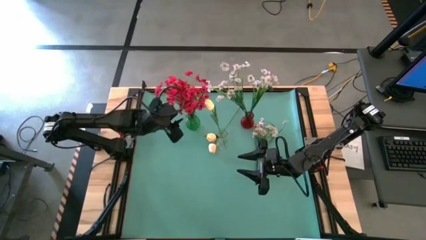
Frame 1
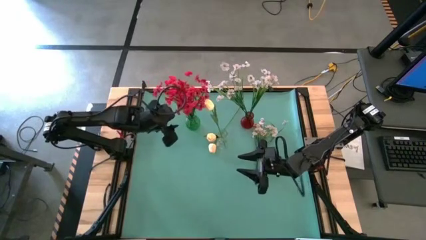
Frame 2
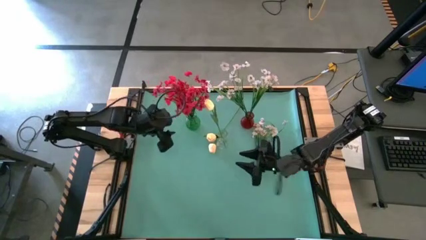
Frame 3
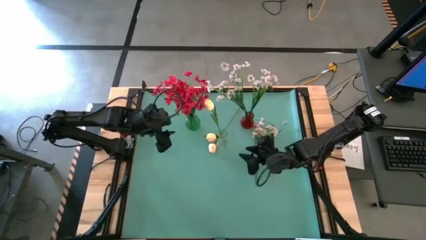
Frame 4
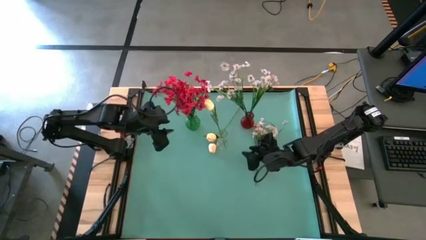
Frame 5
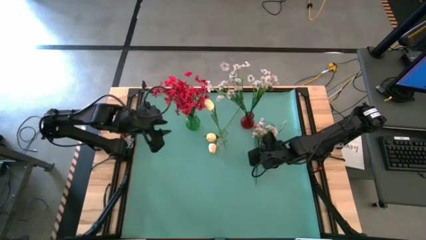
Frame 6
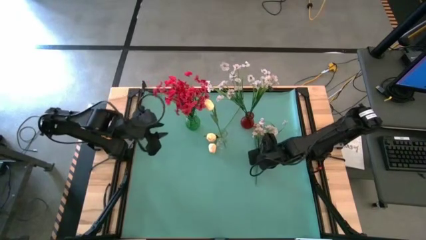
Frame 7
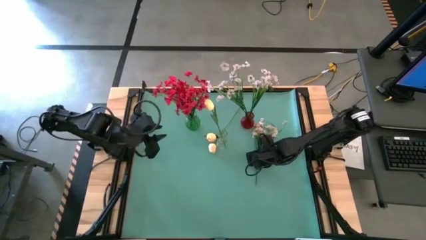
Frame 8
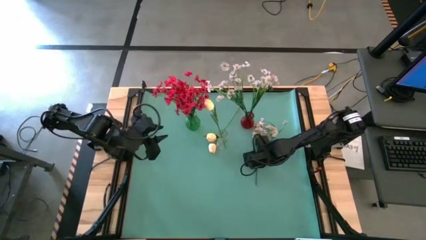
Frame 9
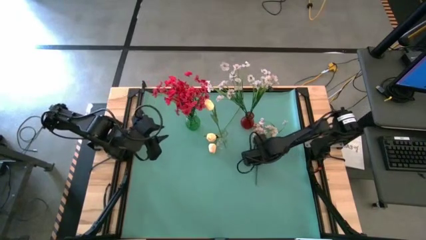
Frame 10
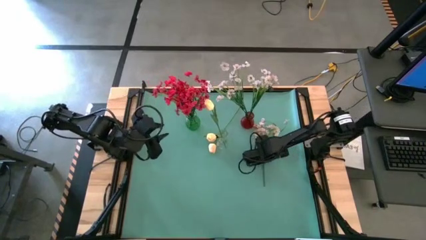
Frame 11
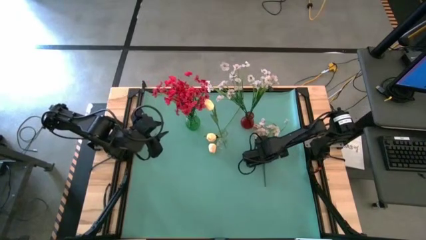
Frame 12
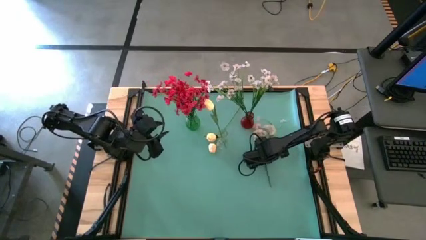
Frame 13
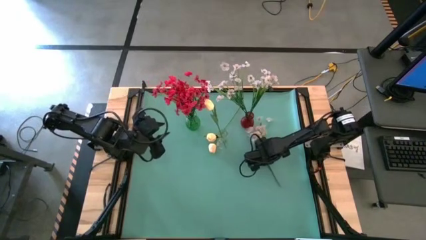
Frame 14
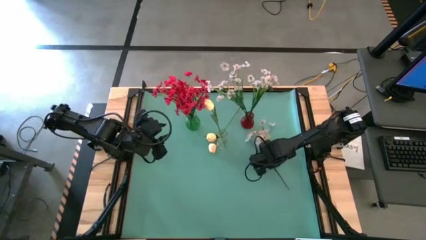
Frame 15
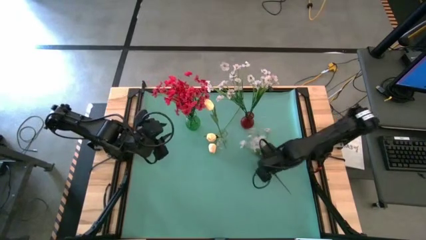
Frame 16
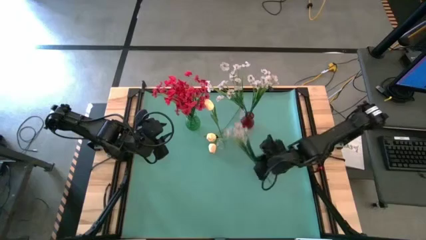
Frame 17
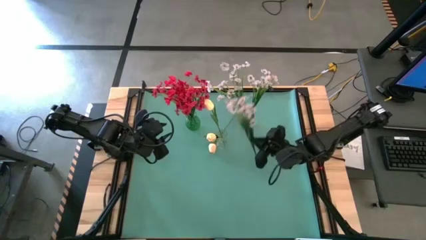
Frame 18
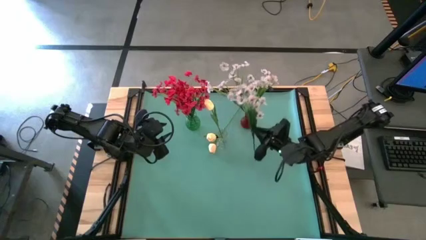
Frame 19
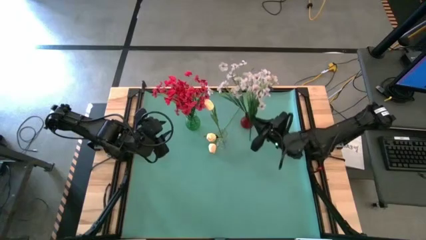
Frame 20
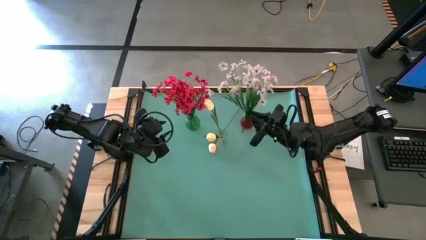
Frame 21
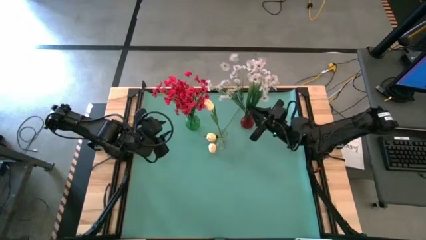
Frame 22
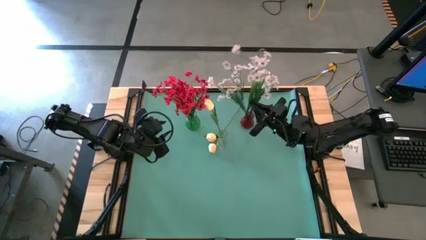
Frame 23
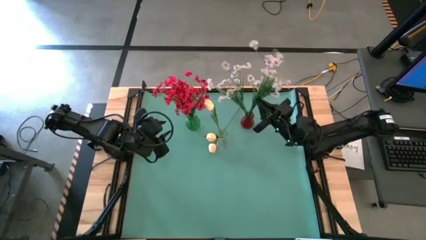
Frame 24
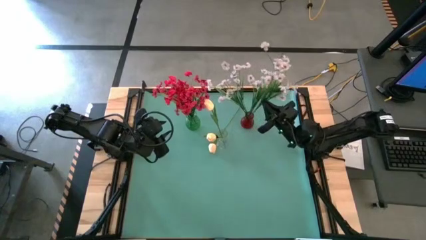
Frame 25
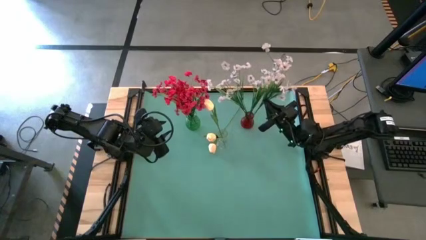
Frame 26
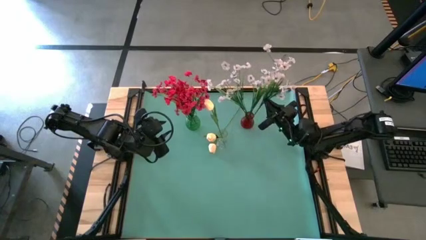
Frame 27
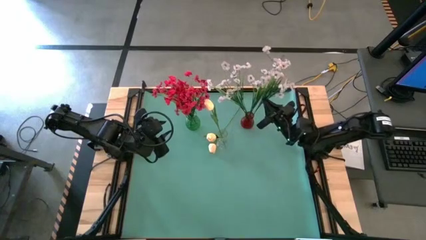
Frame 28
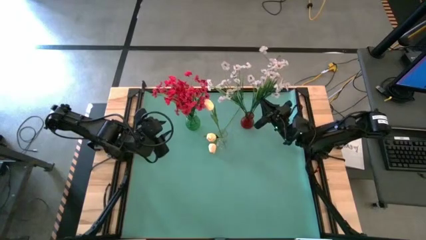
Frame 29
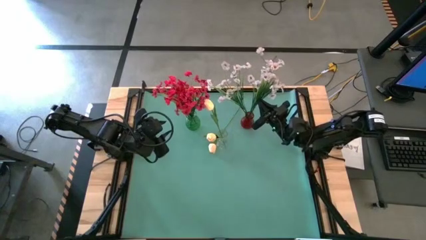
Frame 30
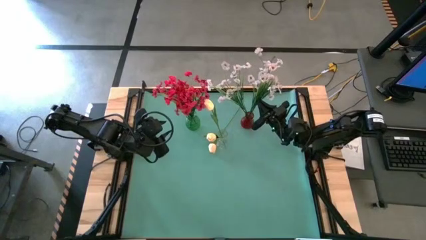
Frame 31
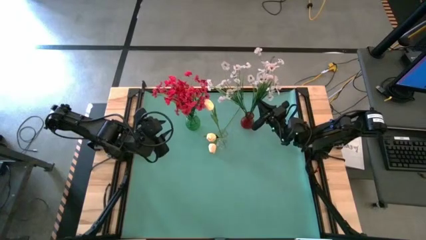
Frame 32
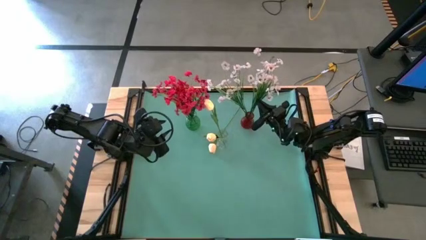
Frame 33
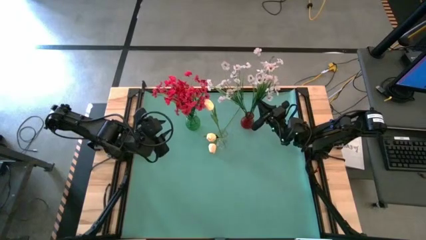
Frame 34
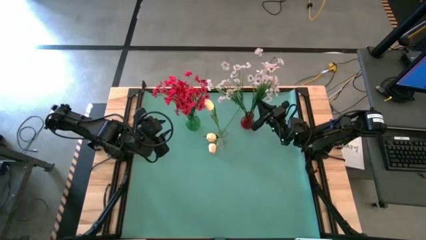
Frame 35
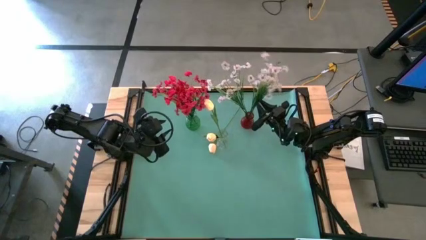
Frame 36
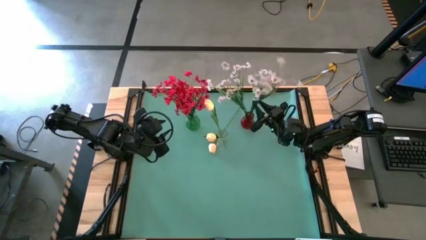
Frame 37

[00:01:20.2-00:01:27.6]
Task: Sort flowers into vase by color
Put the white flower into the red vase

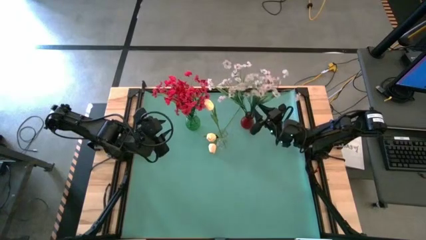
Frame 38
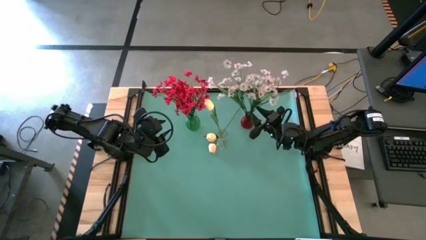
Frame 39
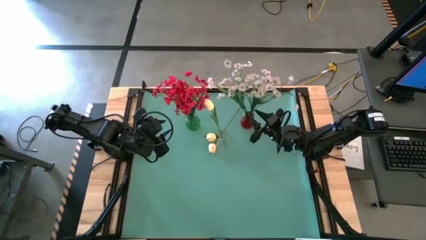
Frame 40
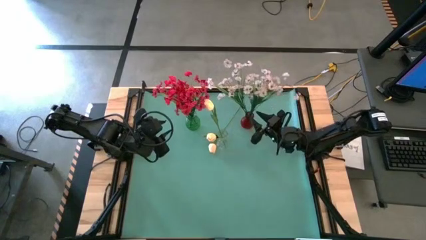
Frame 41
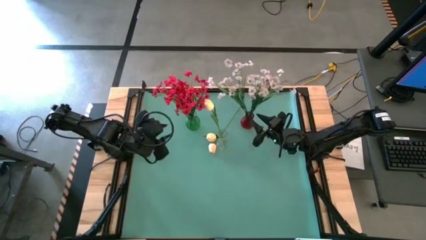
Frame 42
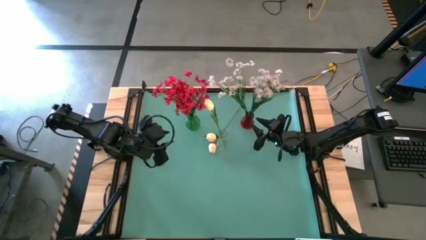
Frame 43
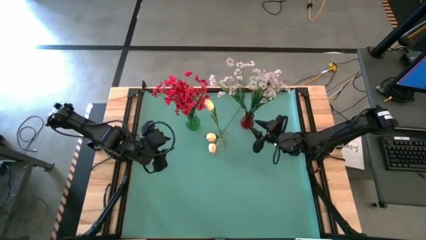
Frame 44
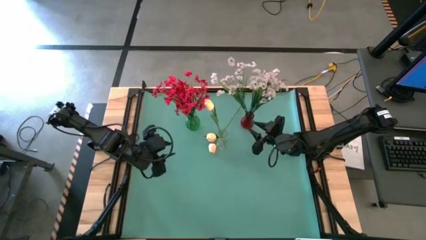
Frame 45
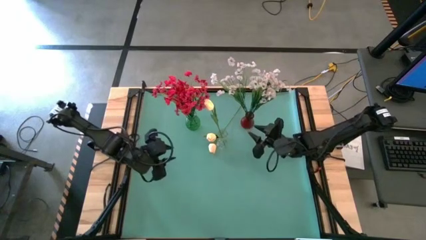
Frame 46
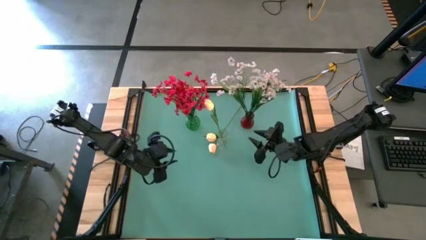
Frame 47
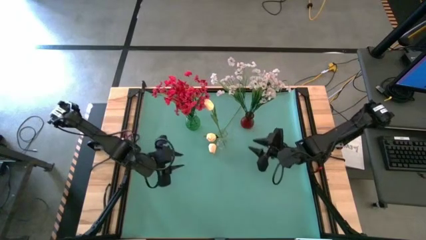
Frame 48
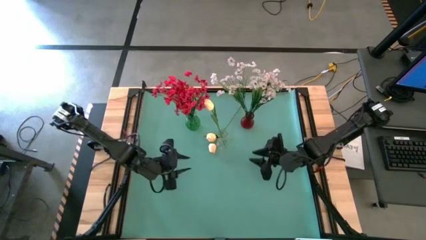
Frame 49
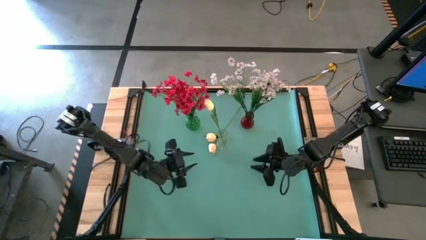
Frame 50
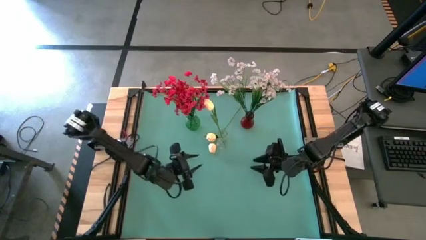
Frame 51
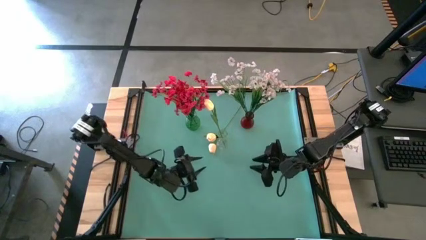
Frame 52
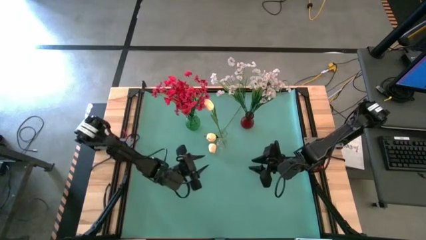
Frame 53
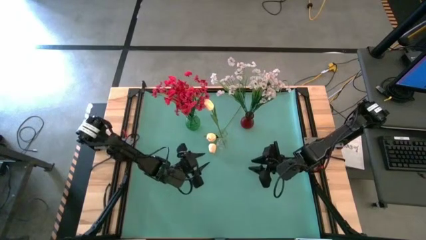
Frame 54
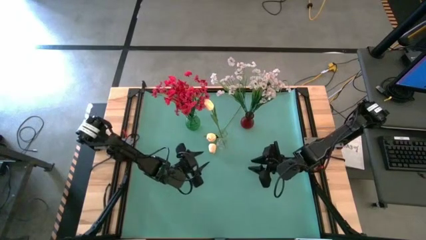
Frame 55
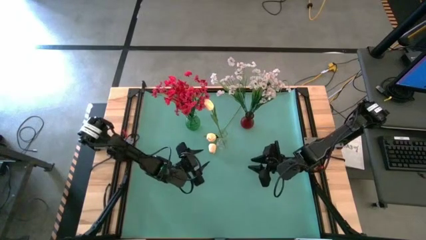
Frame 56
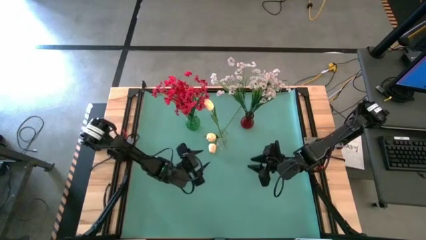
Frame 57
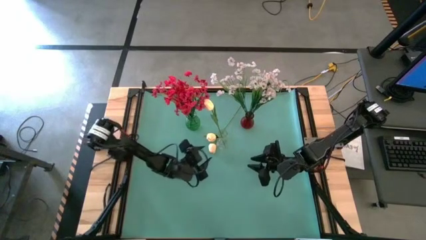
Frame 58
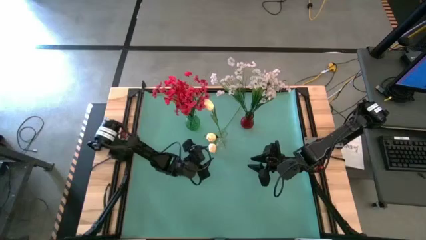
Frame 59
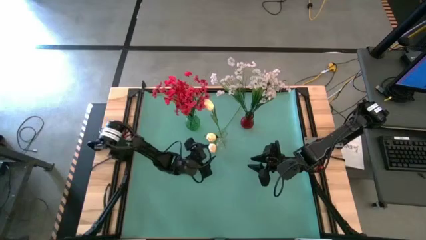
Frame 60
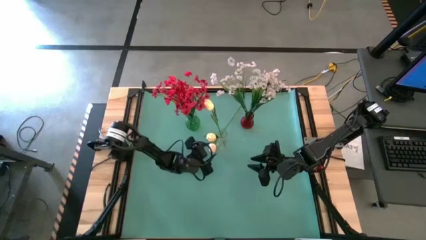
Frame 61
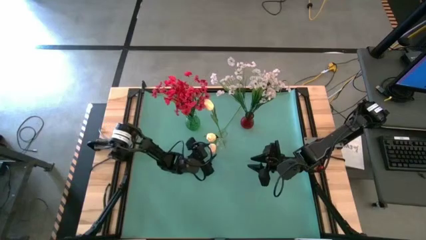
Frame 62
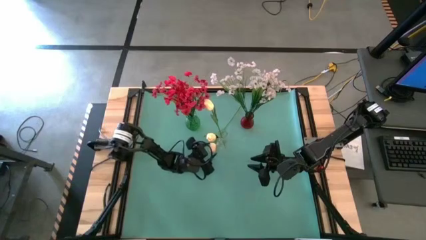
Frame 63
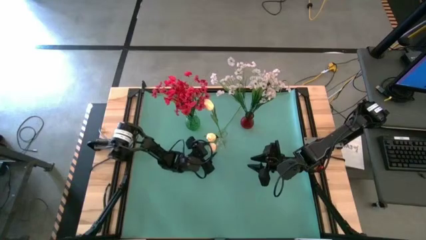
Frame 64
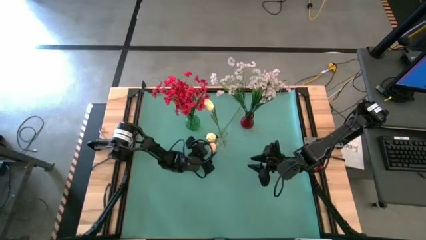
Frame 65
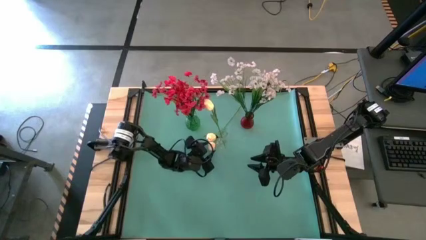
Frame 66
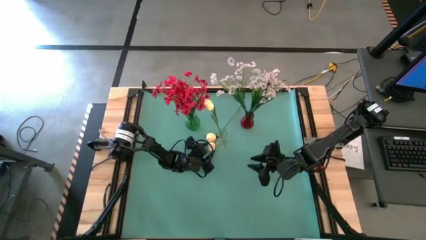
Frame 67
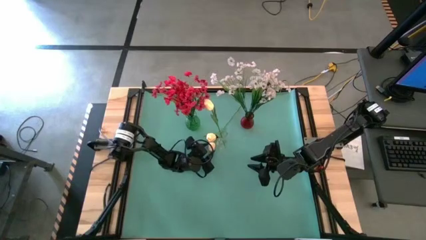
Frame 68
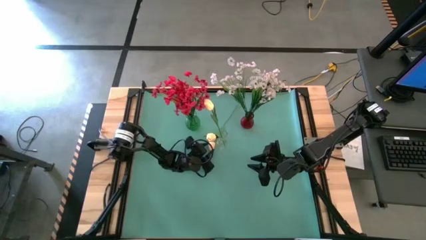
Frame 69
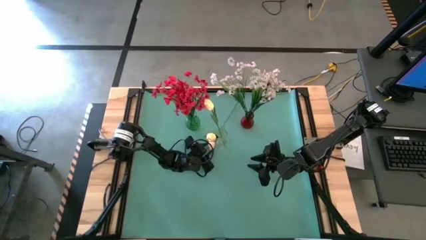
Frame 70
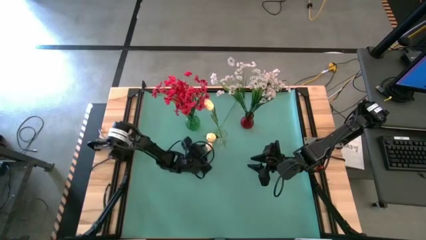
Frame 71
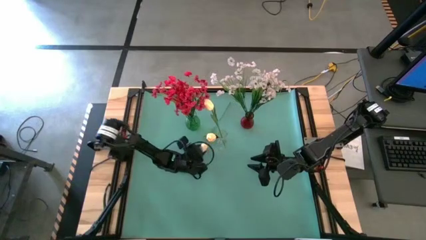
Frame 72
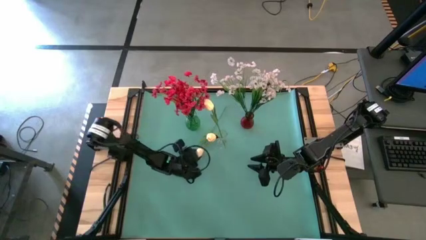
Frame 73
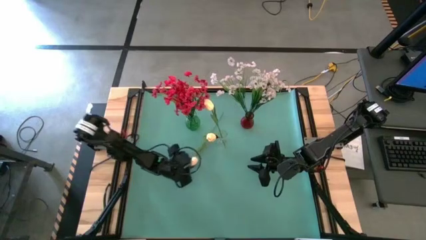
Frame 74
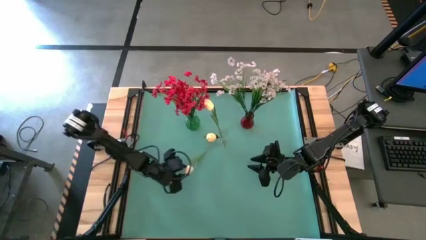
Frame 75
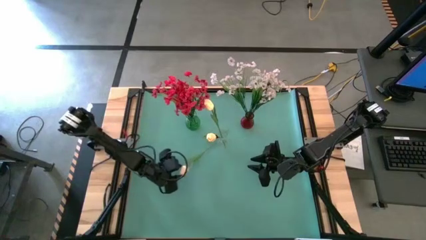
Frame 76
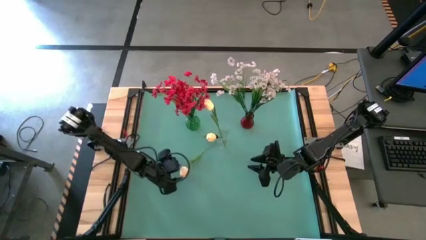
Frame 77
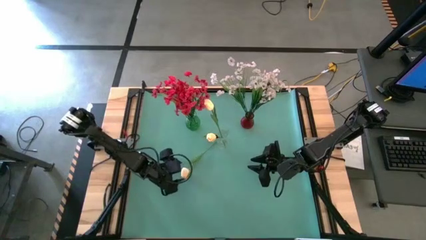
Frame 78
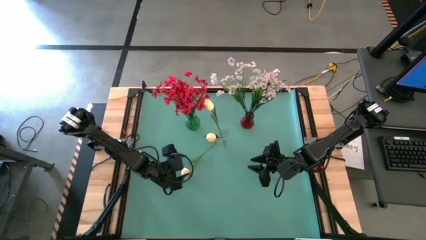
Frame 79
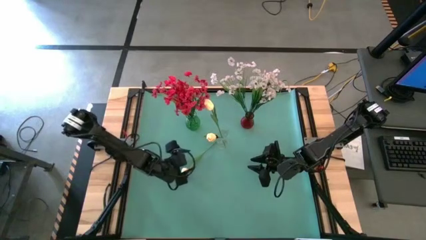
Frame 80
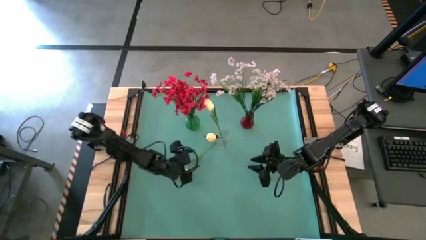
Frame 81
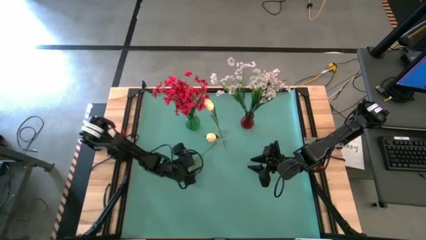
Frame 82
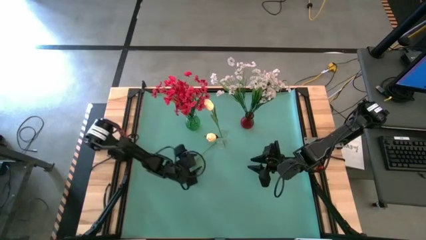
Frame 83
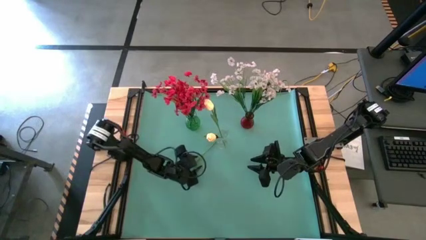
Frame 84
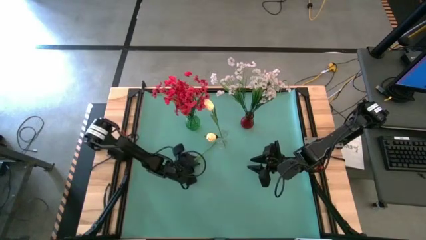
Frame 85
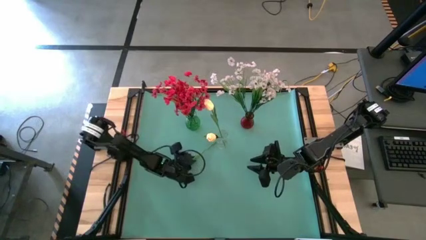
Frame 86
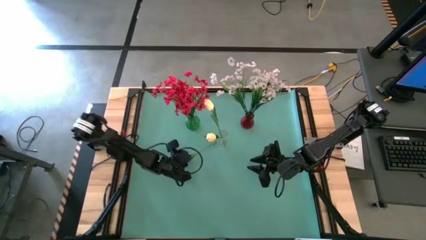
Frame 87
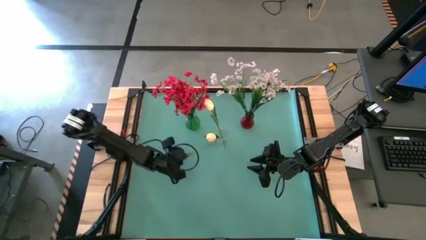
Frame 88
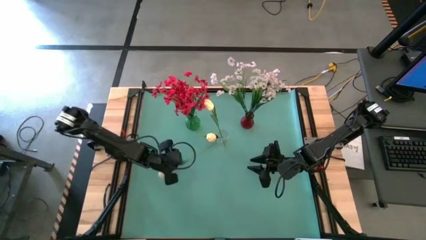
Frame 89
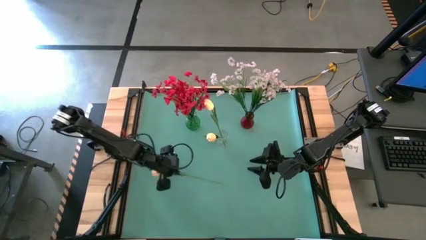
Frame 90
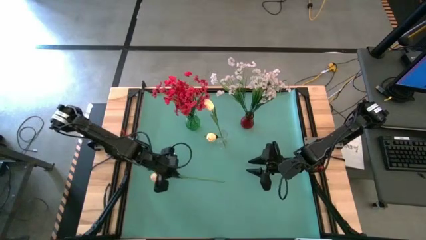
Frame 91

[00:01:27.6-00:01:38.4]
Put the yellow flower into the transparent vase
